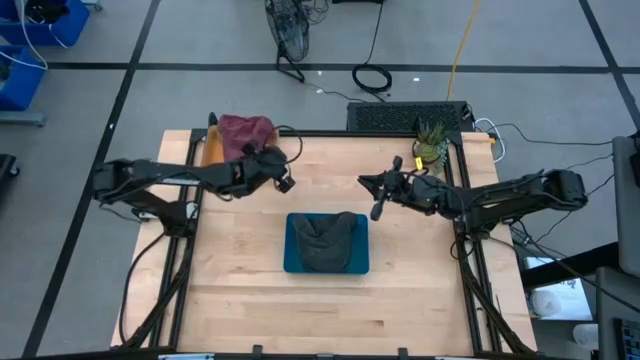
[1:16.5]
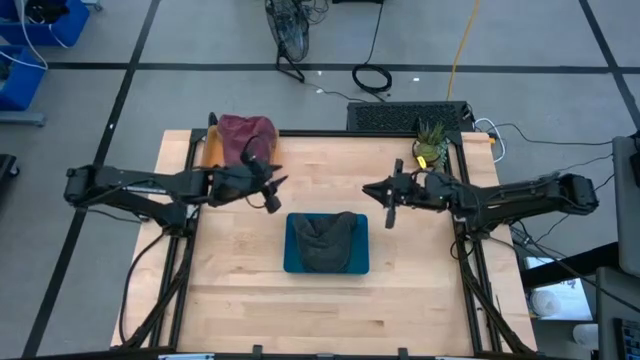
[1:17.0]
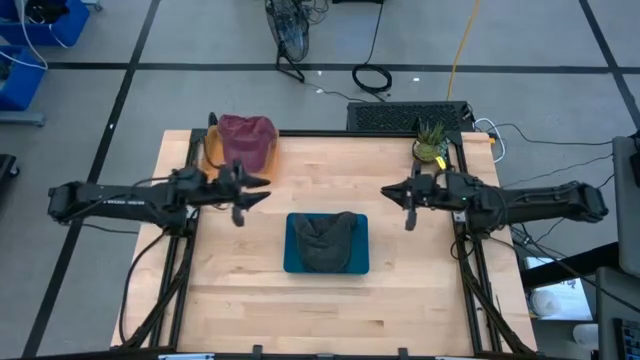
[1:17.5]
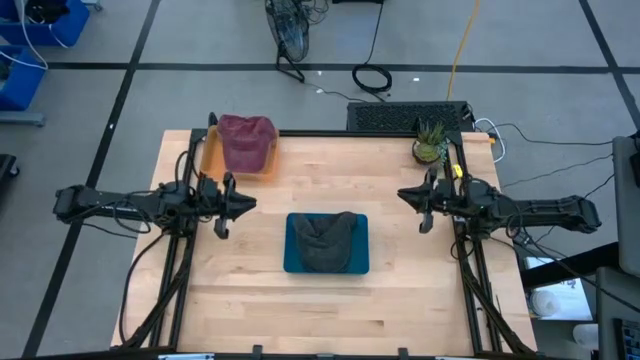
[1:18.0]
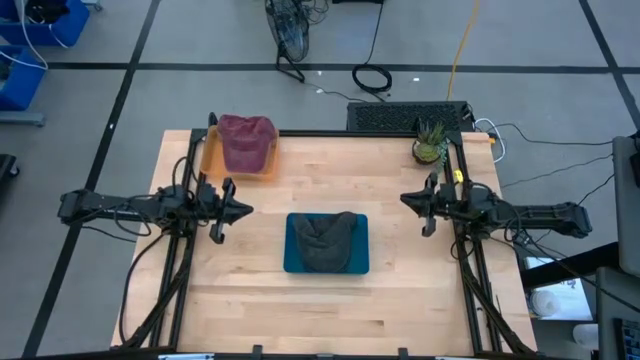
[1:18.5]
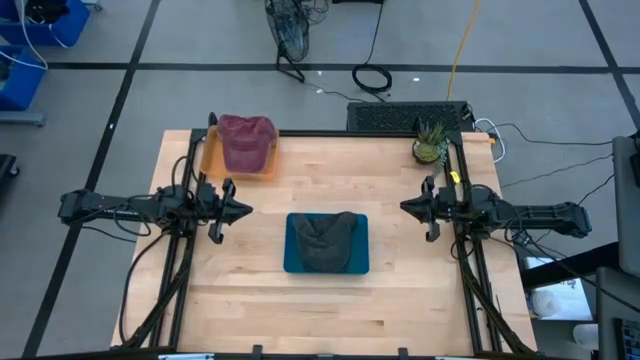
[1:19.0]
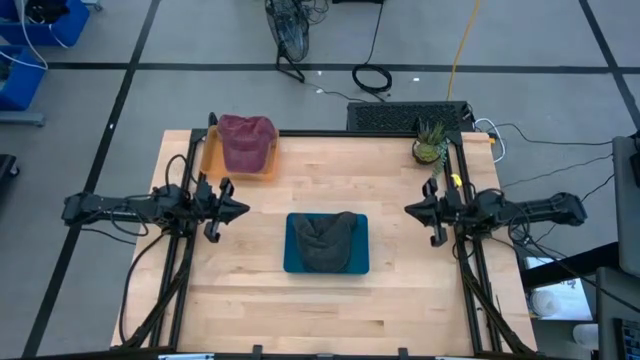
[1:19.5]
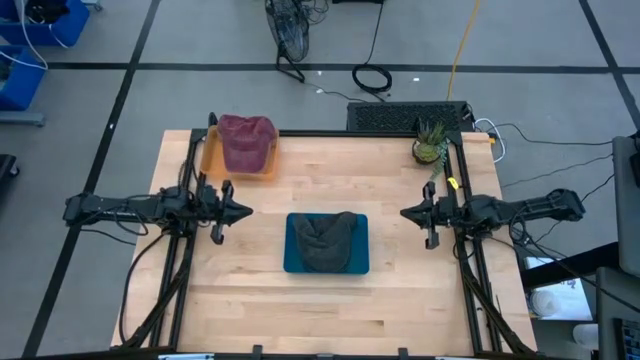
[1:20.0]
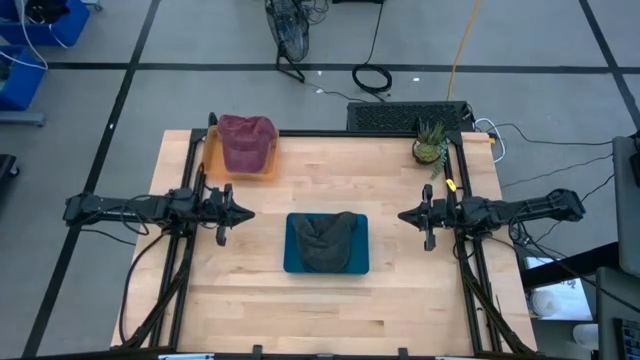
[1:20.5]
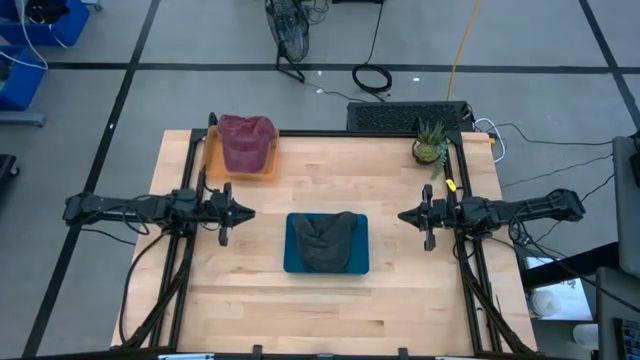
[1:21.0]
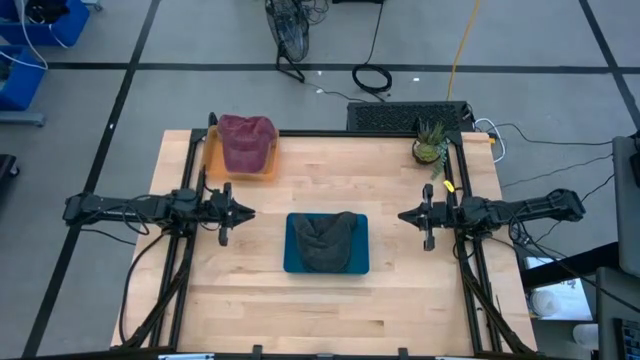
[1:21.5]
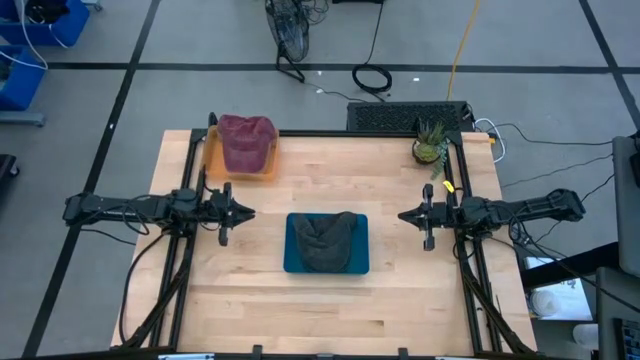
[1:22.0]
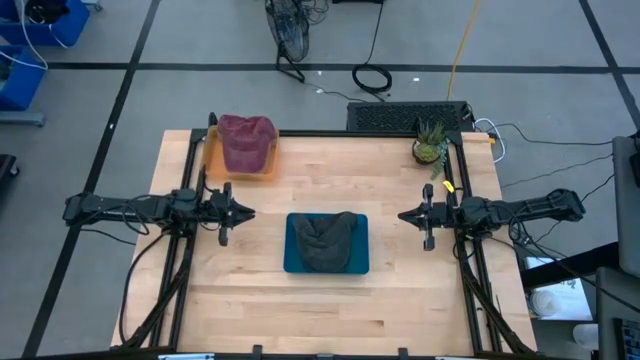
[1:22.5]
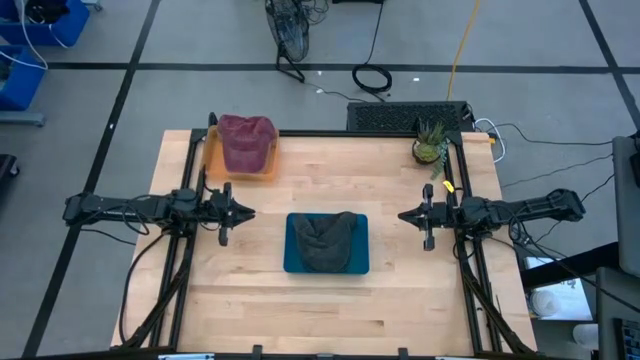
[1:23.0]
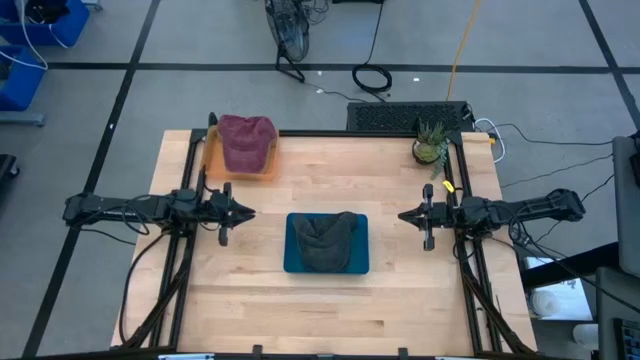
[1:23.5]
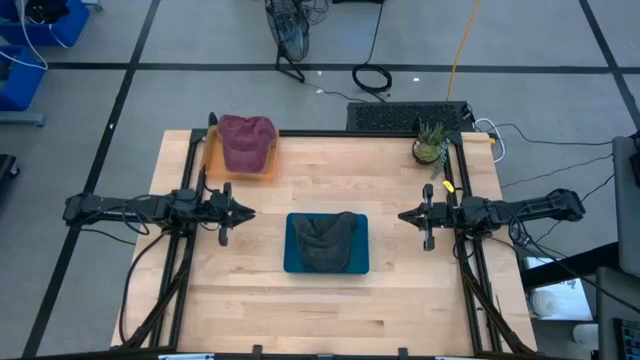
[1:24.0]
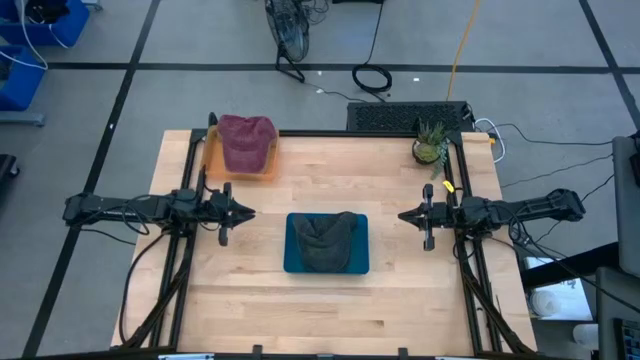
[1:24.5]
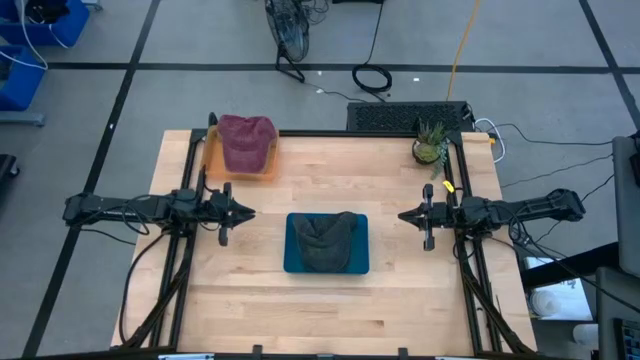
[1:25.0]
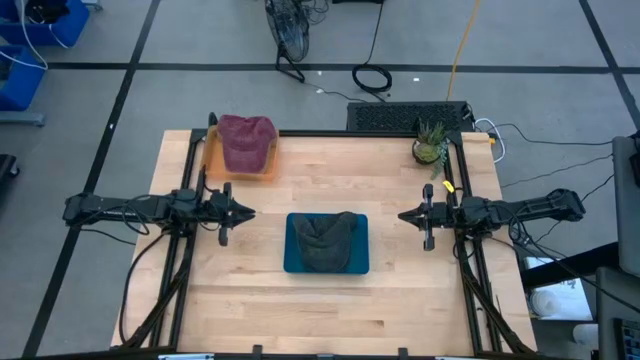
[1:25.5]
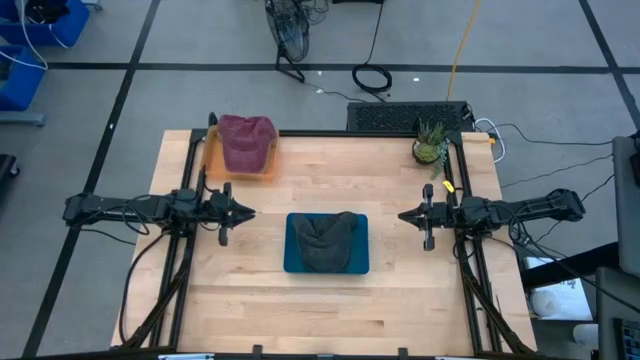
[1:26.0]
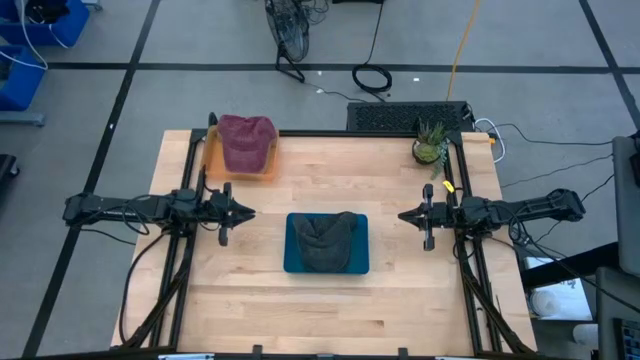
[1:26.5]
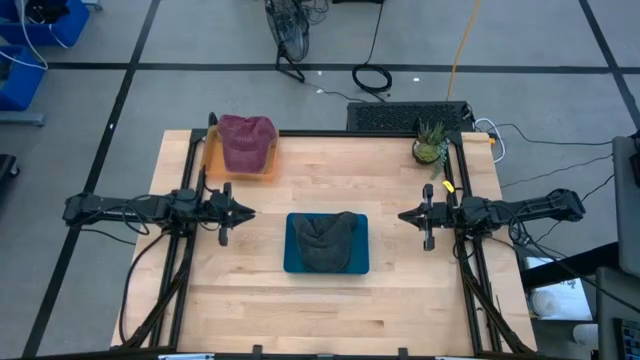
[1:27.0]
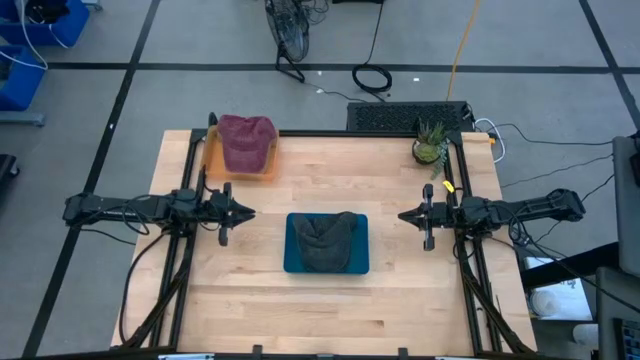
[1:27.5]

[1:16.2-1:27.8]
Task: Pick & Place hat
Return to home position

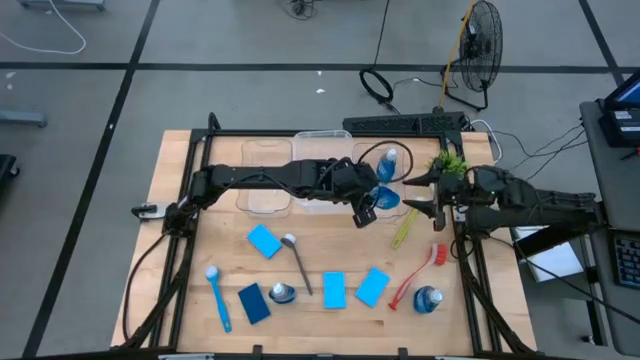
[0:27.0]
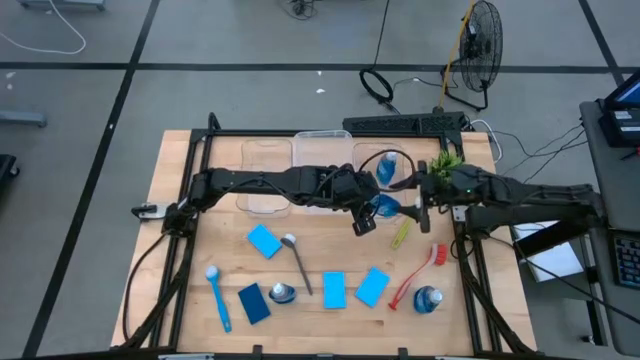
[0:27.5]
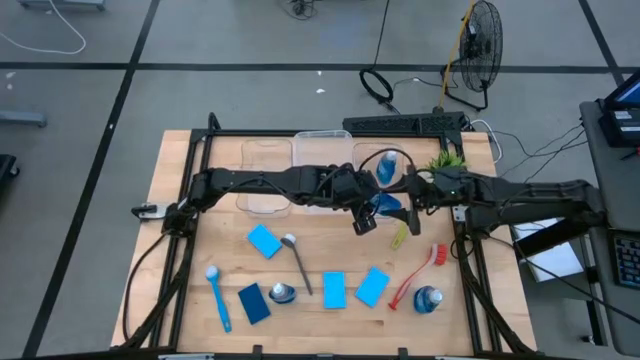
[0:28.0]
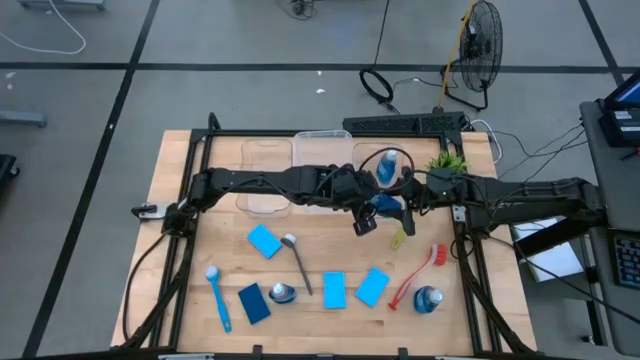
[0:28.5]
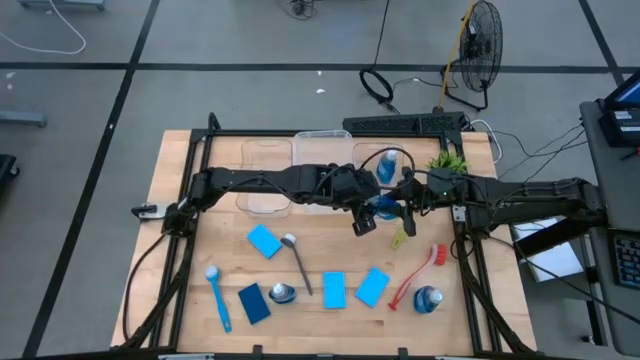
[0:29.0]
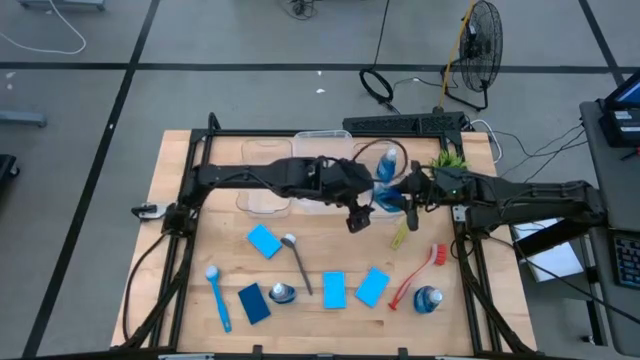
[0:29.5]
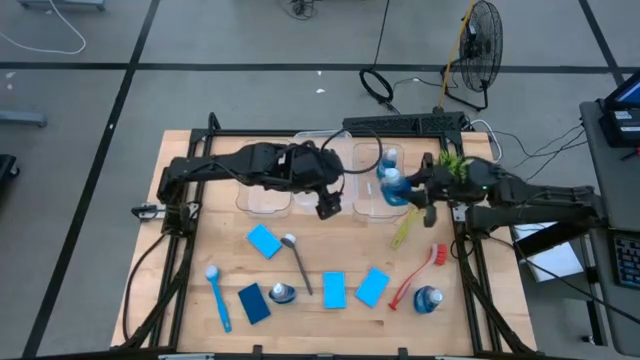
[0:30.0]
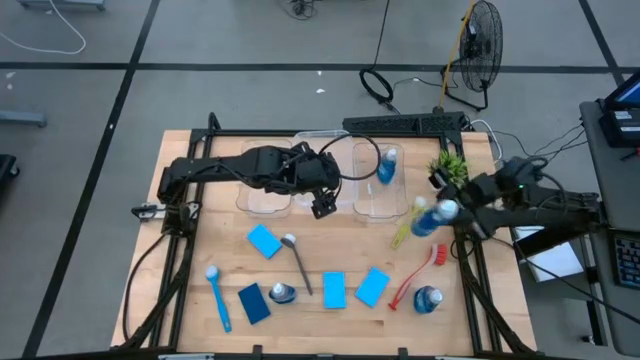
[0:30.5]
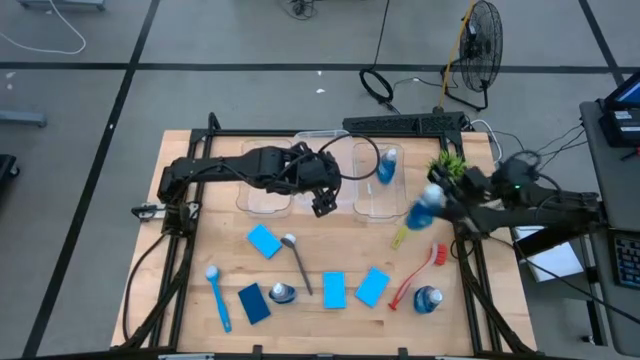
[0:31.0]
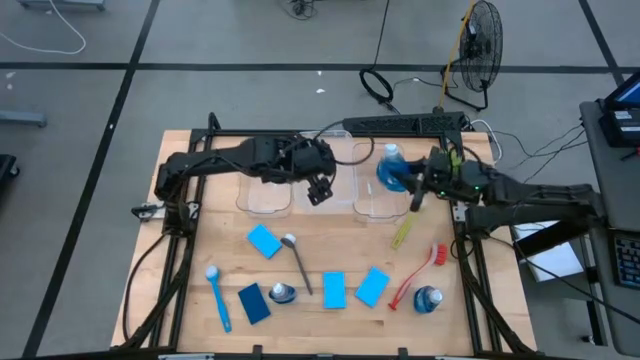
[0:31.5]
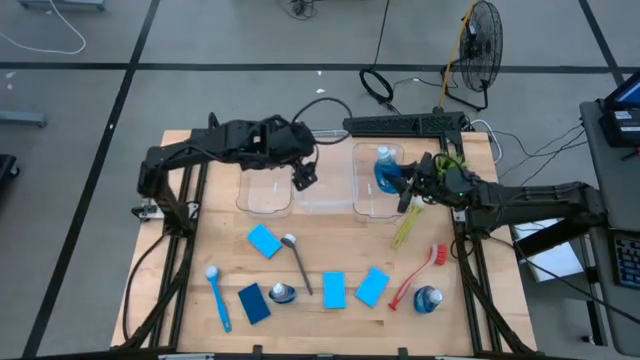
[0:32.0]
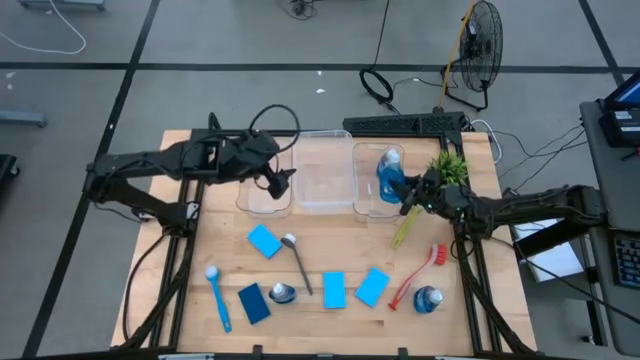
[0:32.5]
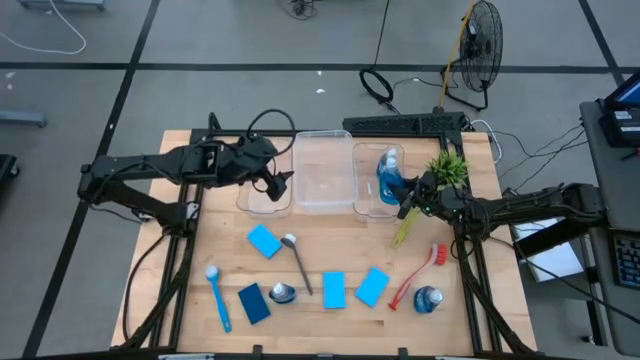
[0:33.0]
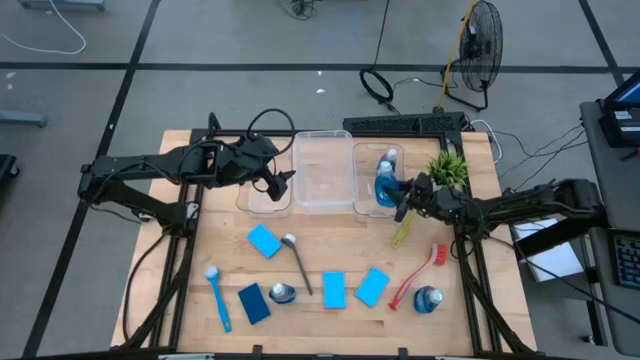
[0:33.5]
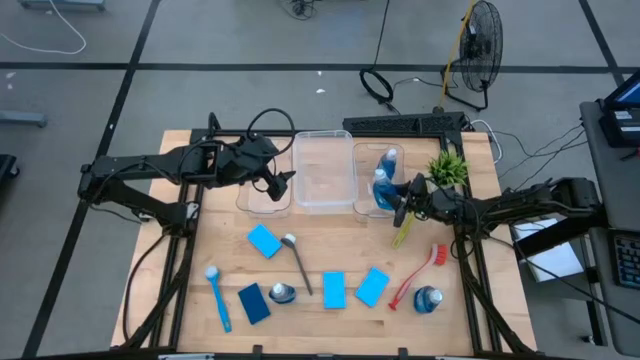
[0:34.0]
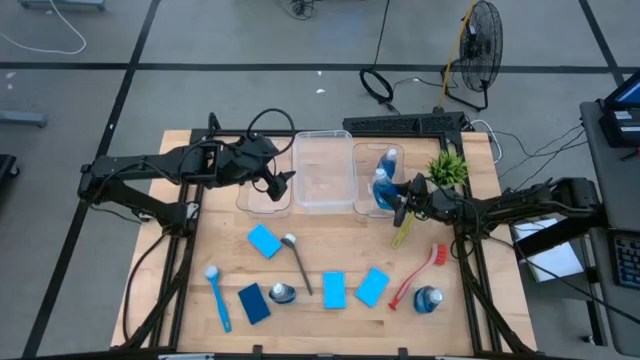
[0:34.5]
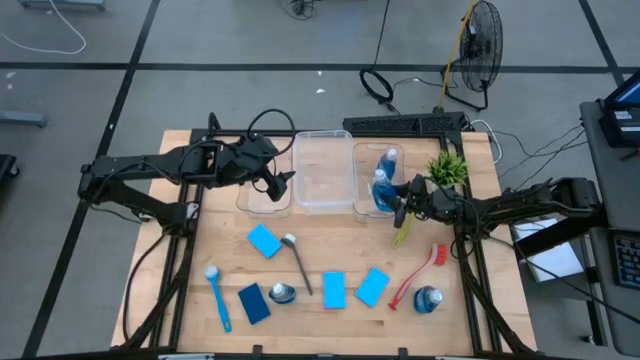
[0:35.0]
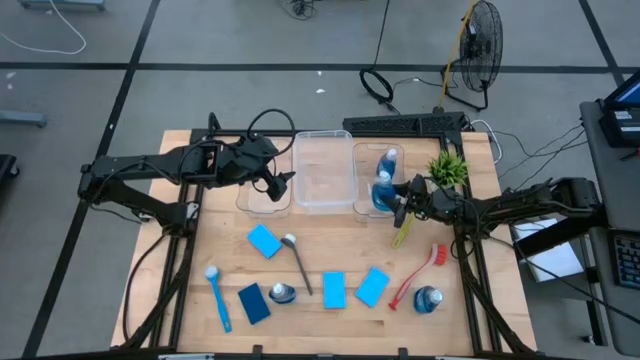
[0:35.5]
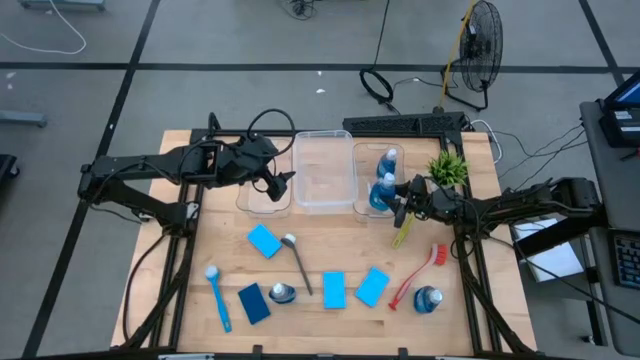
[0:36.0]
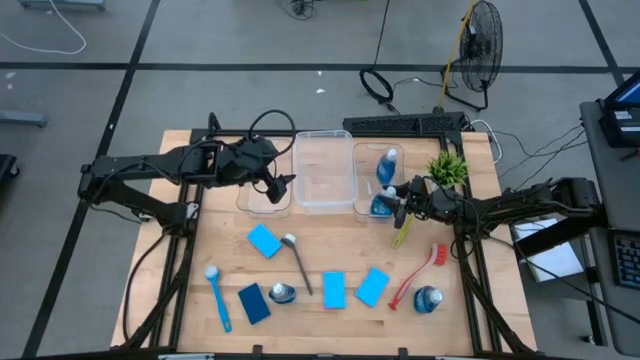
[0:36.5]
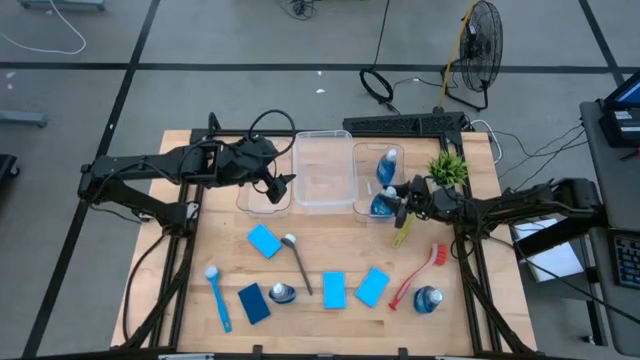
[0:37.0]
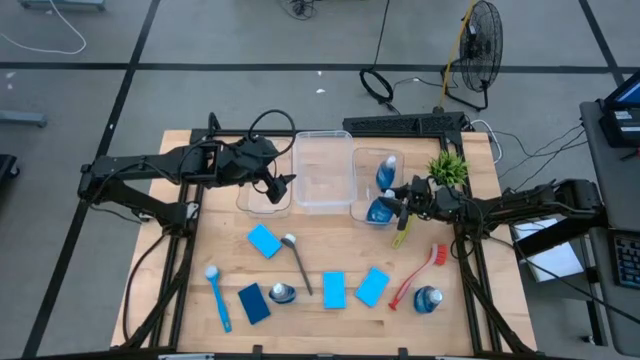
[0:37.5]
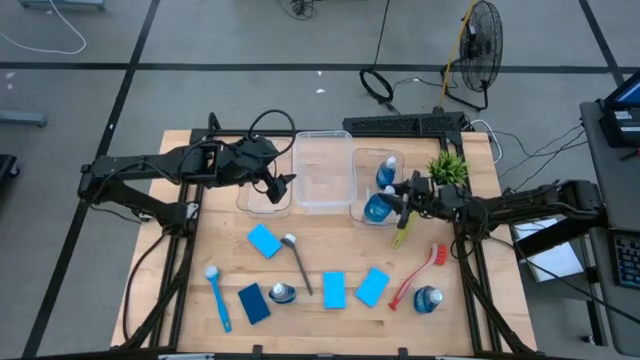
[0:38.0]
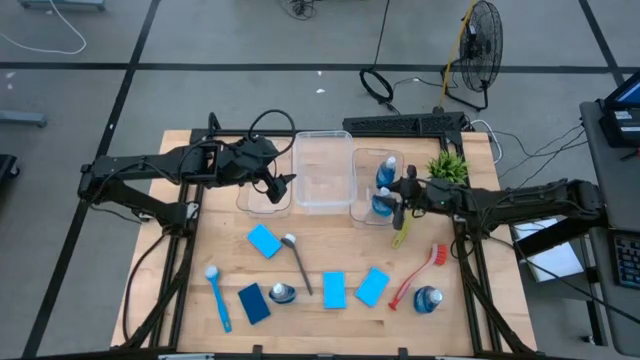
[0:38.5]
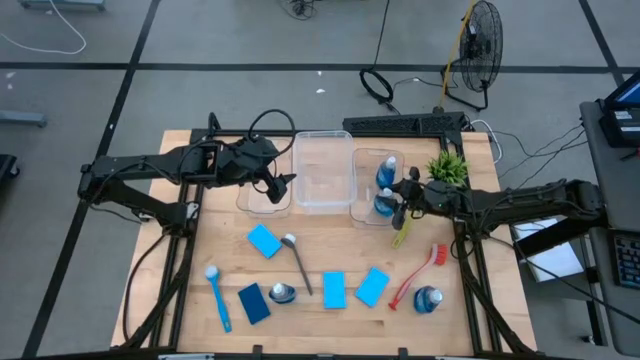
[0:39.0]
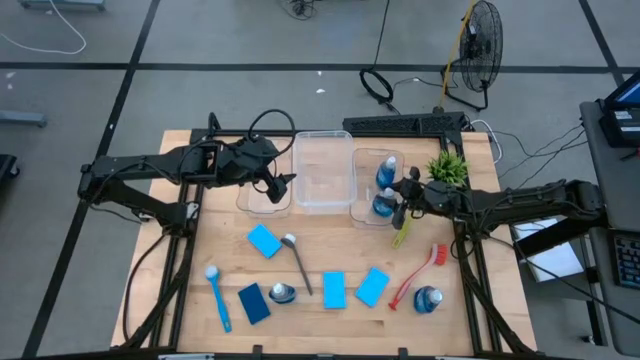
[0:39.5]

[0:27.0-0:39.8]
Task: Pick & Place Kitchen Sink Supplies
Put the blue dishwashing liquid bottle into the right transparent bin
